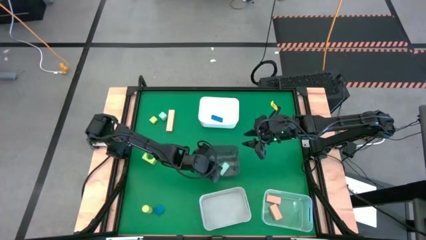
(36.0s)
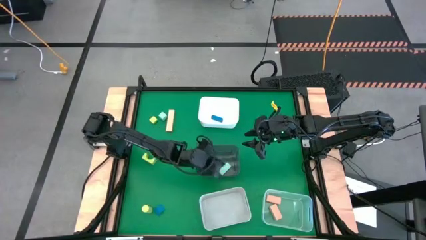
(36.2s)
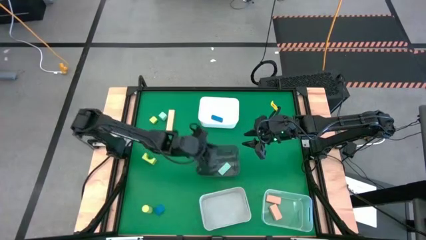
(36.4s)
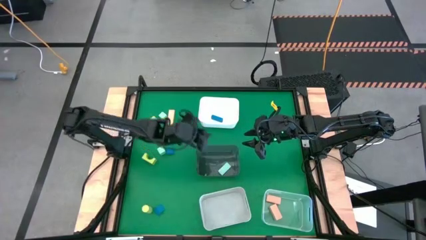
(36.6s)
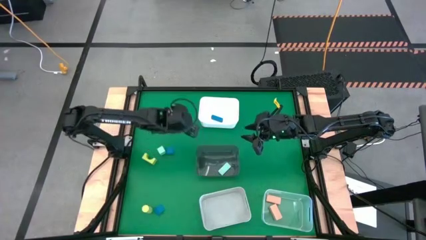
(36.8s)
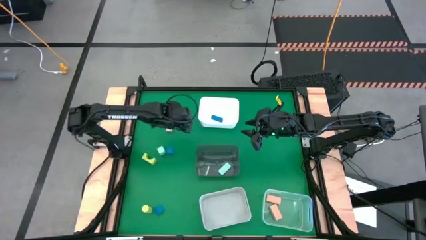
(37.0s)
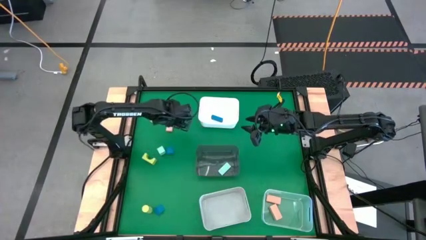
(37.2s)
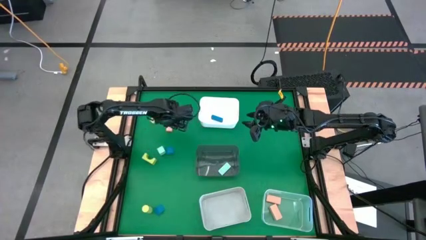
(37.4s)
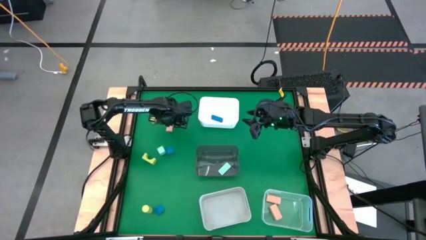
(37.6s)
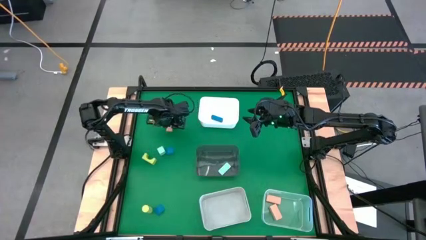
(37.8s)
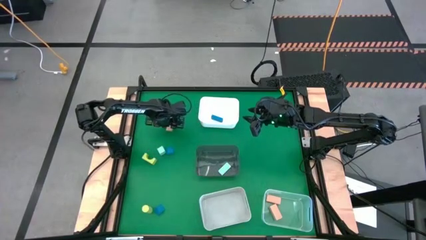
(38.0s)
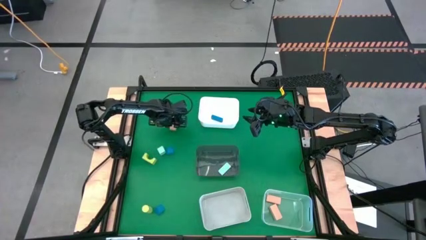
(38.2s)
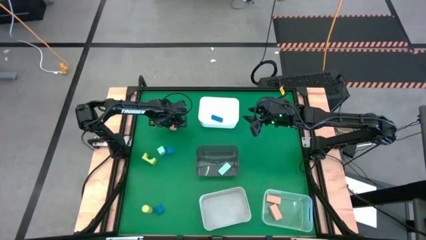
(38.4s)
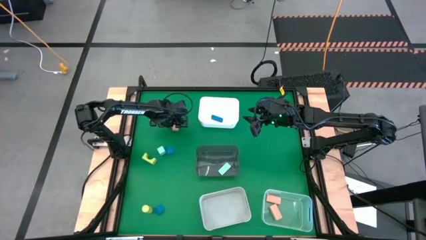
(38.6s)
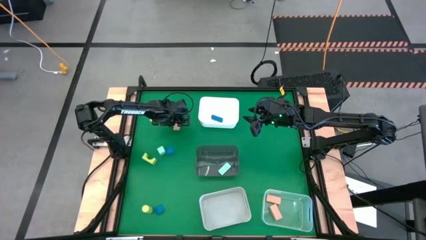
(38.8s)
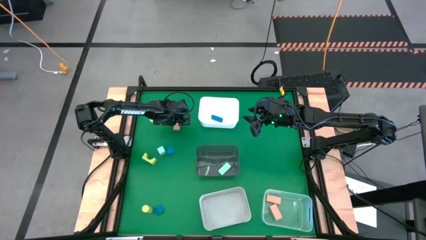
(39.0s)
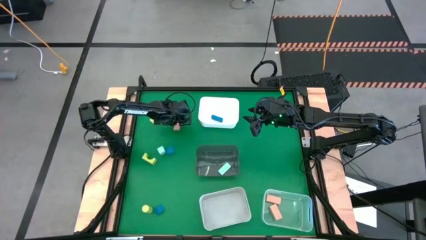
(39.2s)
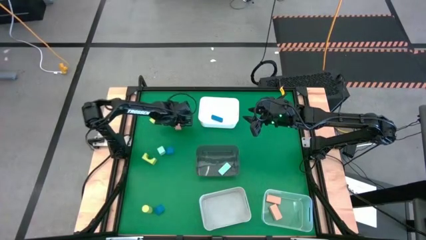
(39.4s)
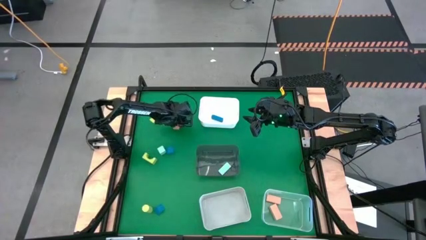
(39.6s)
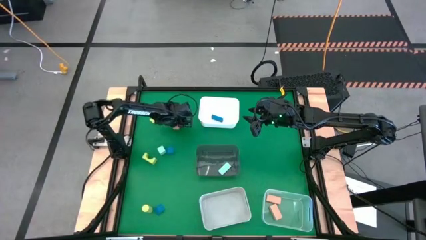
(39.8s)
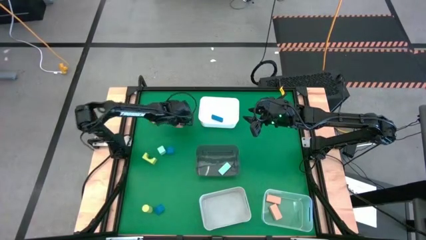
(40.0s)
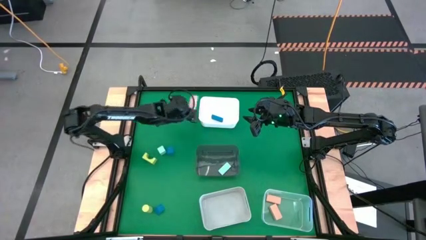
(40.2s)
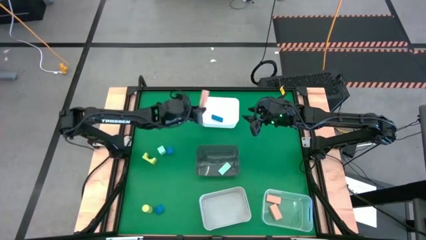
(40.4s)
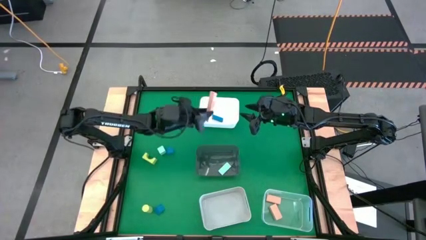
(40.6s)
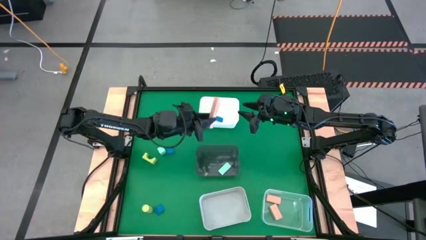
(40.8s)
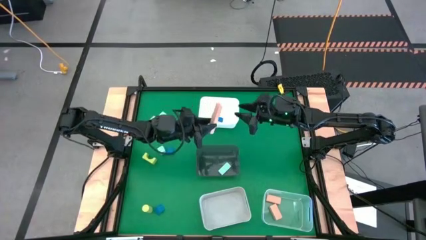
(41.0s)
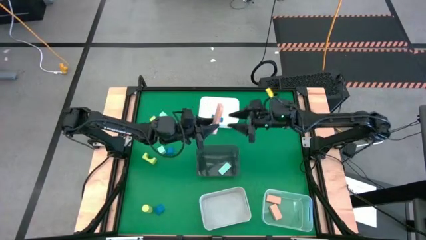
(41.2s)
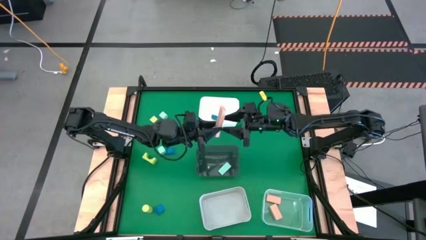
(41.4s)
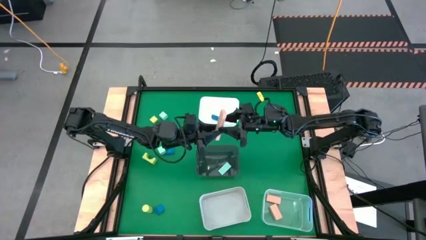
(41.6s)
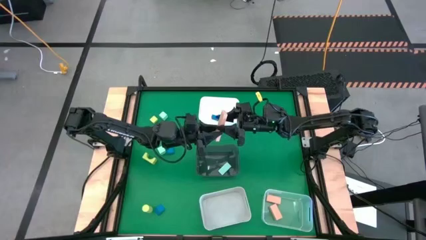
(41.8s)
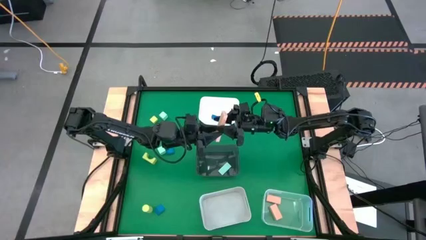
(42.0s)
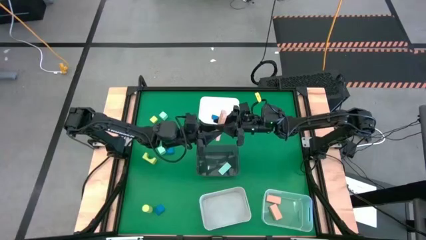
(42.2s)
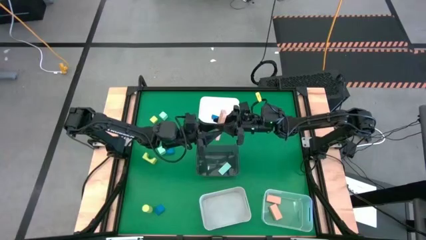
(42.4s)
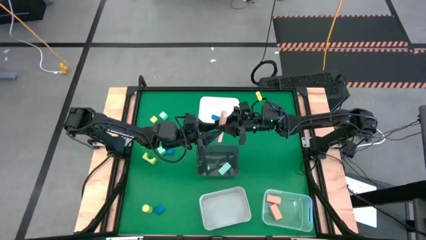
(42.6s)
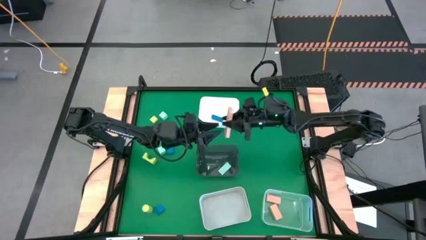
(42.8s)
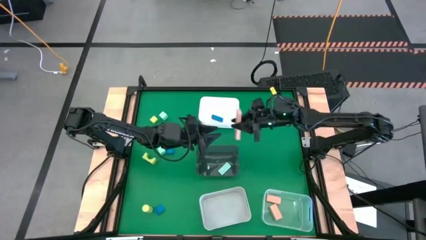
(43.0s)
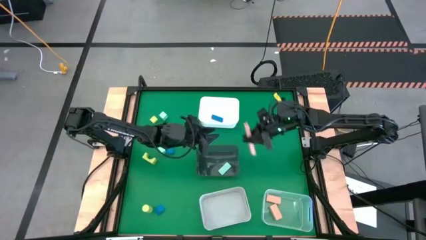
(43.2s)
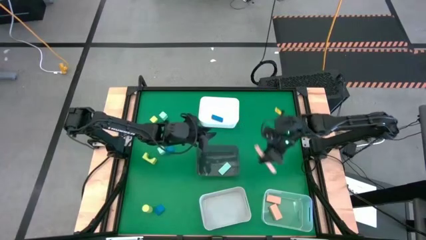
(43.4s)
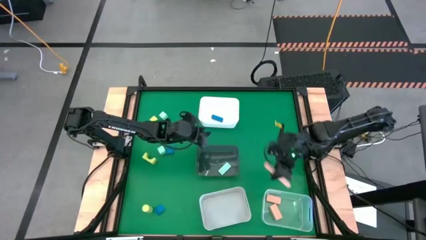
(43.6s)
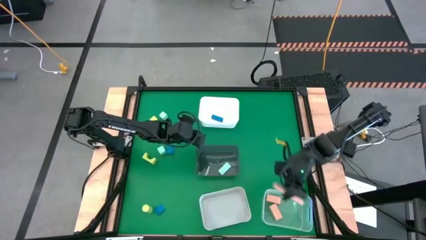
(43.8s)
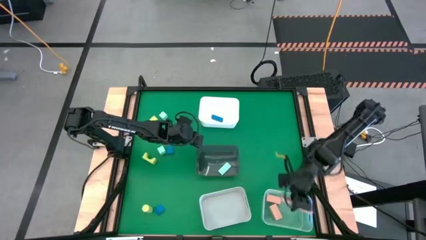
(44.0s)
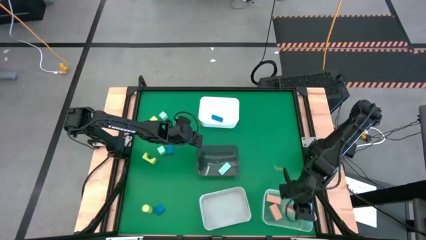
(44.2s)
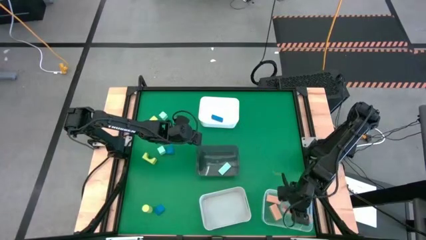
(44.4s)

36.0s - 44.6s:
Task: Sort & place blocks by color
Put the light brown block into the transparent bin

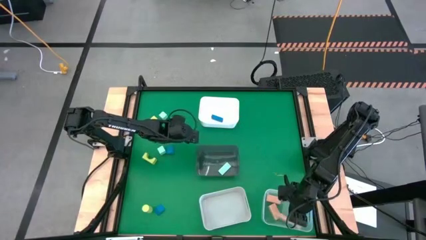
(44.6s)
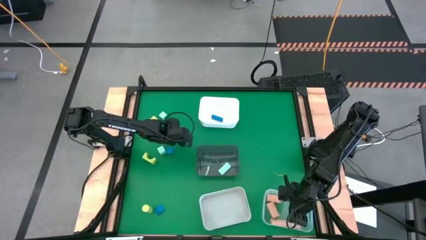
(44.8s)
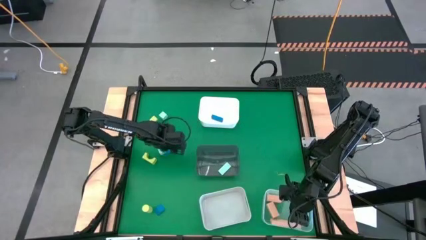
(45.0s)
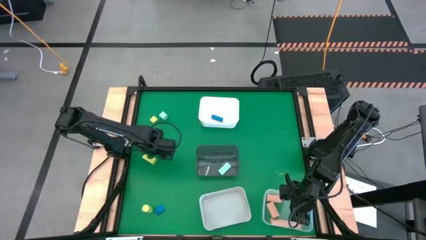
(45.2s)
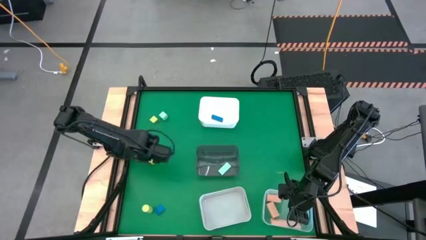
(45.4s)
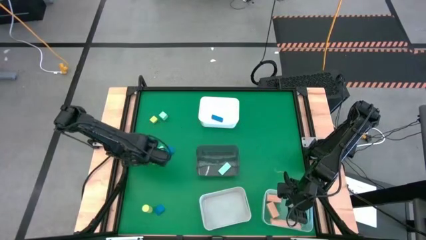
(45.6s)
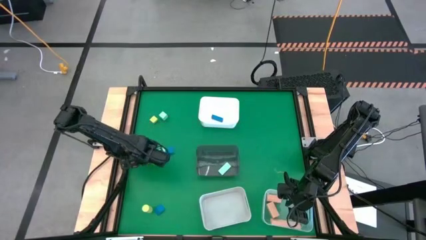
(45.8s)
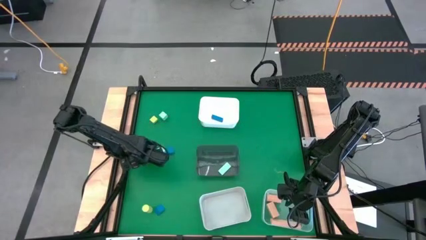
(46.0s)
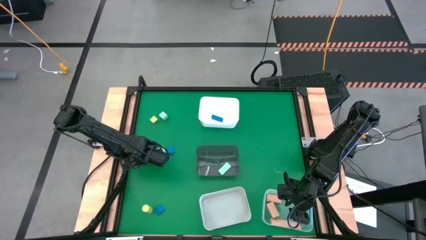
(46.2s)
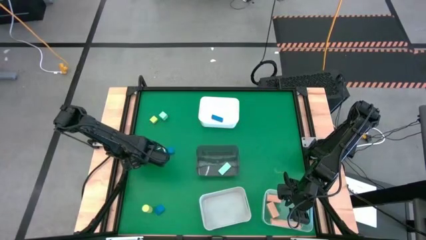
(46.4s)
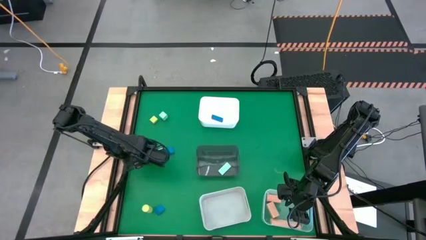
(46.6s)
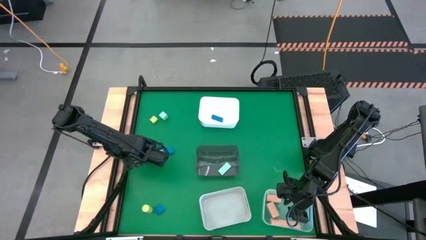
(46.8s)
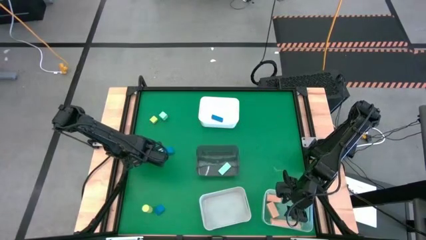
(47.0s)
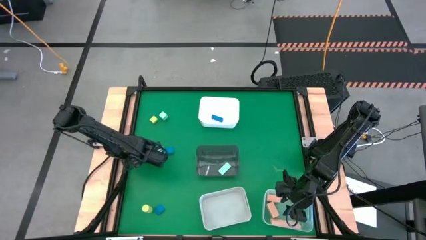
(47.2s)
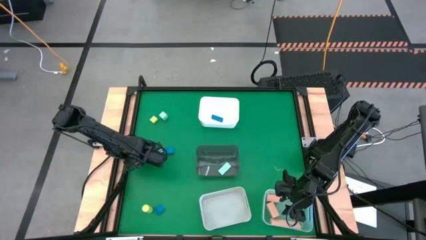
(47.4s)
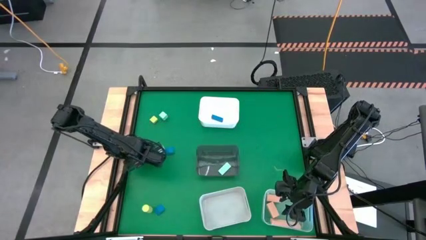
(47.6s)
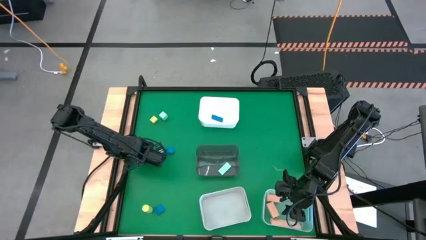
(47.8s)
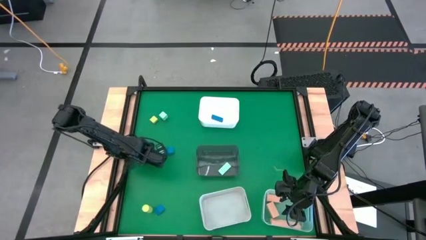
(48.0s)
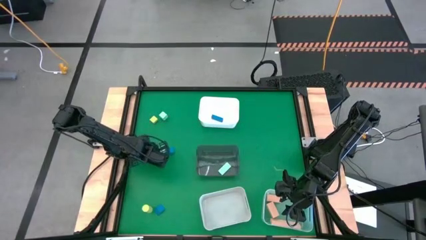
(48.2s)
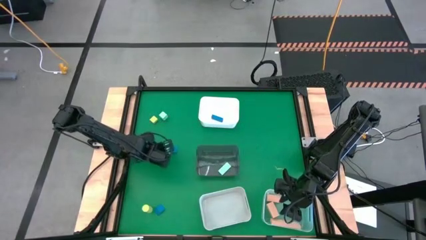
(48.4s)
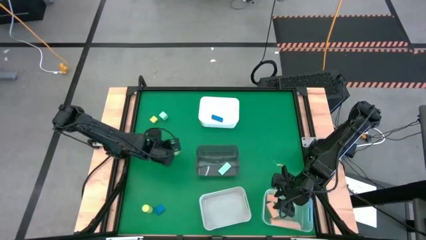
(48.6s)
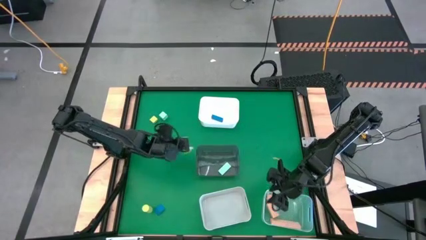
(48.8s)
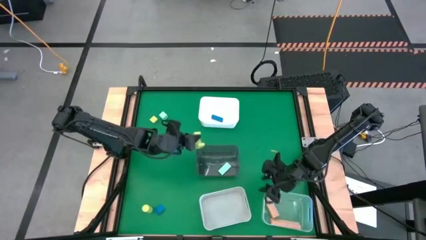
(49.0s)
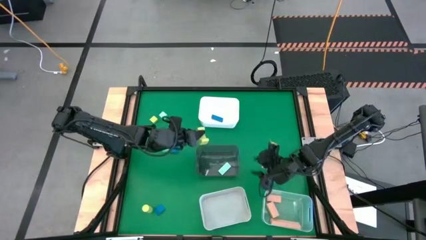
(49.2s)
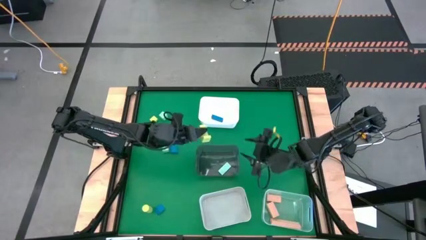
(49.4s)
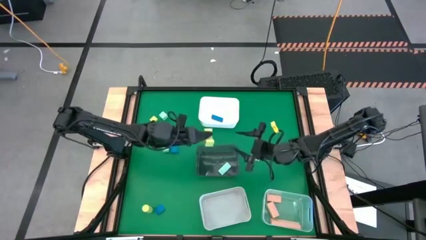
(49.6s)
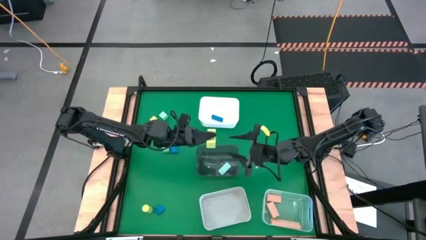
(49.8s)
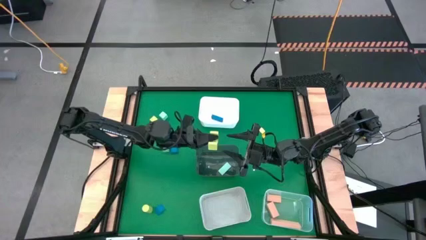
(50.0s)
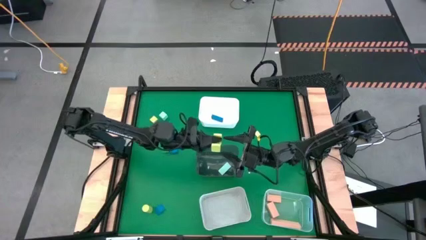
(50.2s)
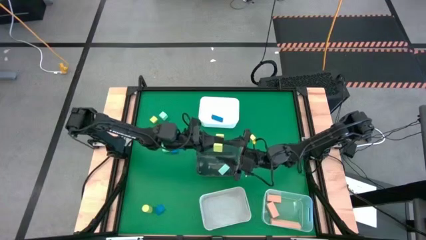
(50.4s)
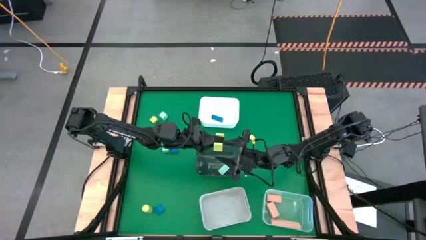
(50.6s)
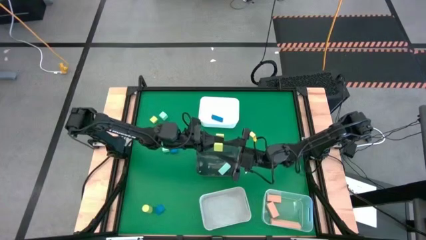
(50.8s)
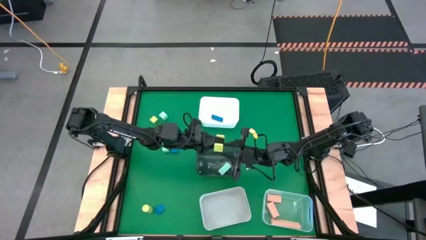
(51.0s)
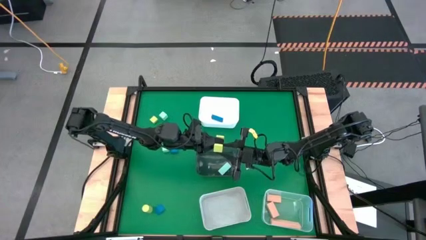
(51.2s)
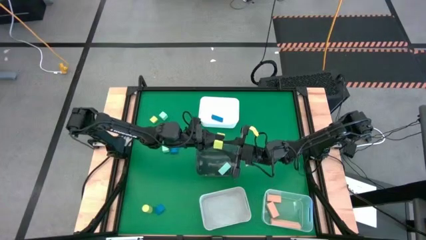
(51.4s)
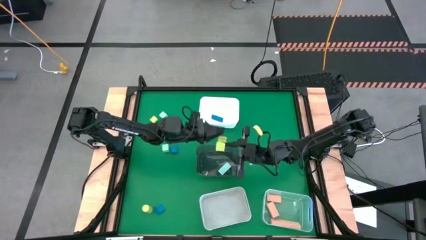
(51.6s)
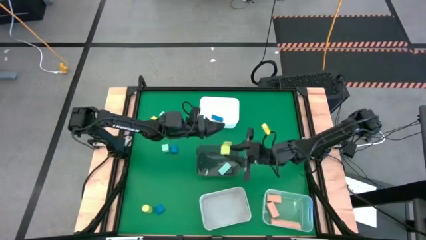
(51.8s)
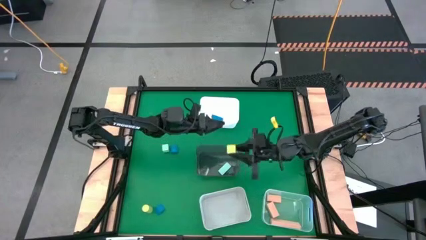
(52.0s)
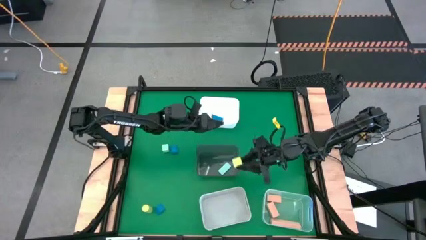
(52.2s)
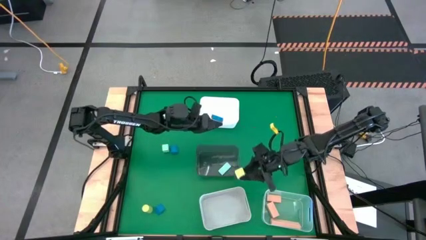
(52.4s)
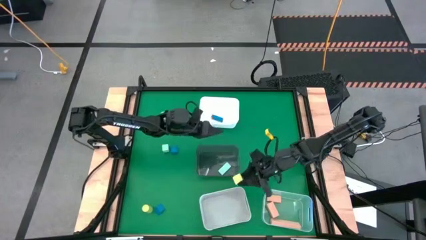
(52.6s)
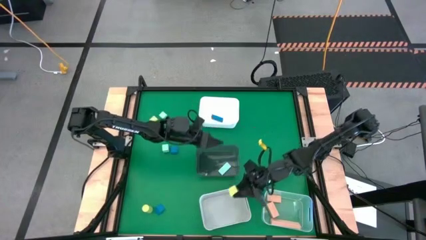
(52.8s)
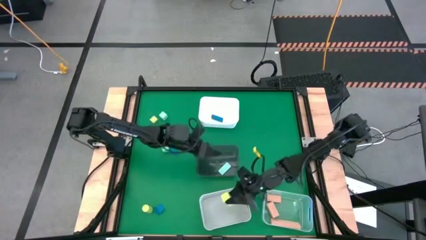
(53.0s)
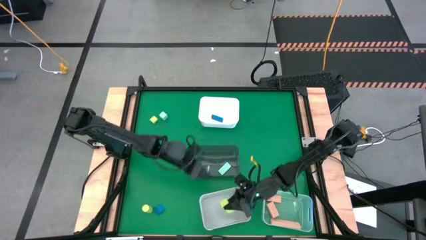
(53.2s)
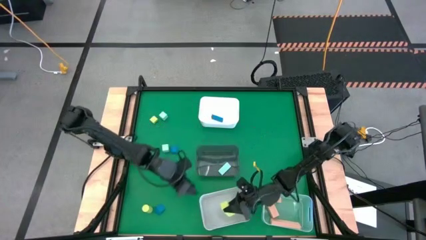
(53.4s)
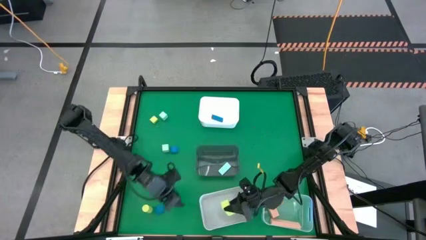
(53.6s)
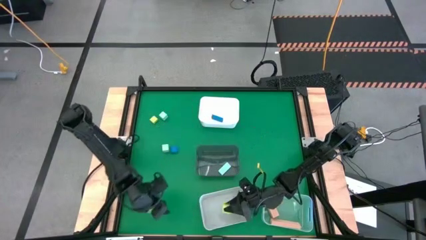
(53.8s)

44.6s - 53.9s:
Put the middle light green block into the gray bin
